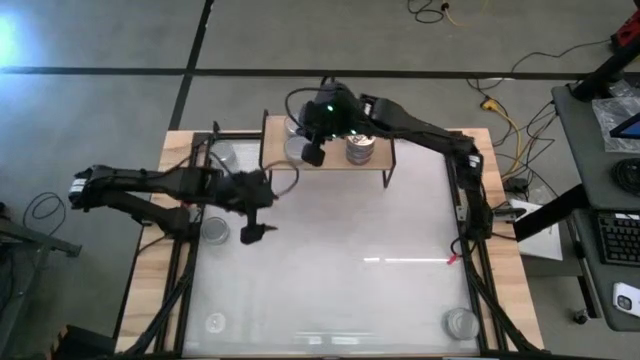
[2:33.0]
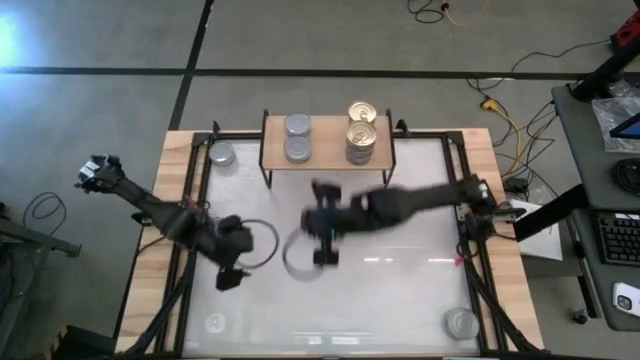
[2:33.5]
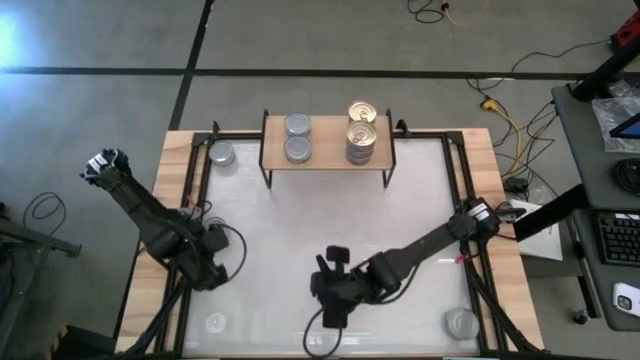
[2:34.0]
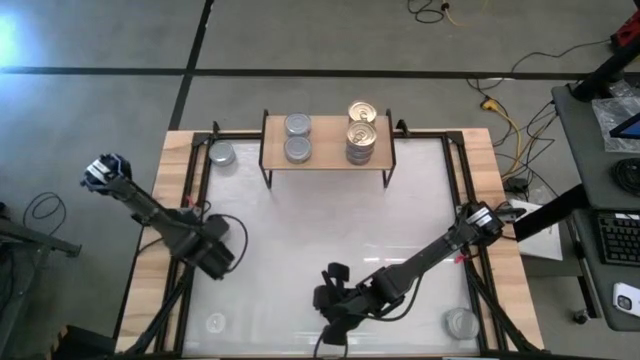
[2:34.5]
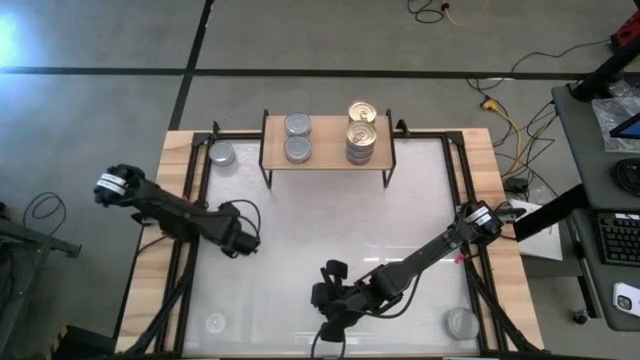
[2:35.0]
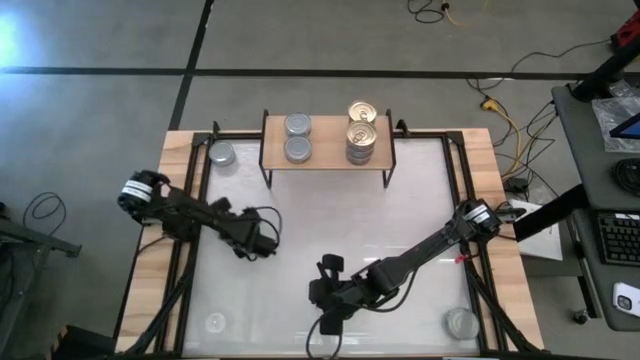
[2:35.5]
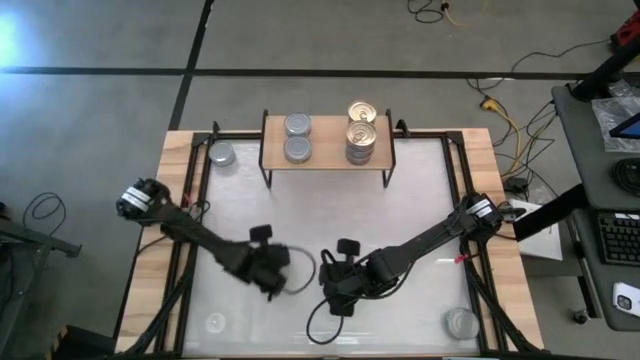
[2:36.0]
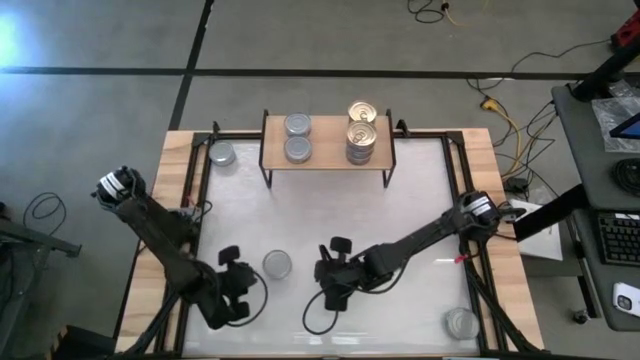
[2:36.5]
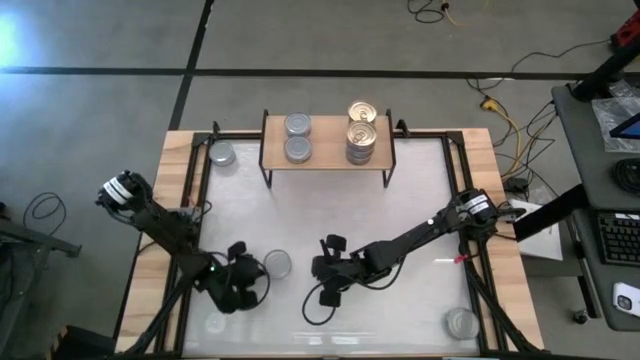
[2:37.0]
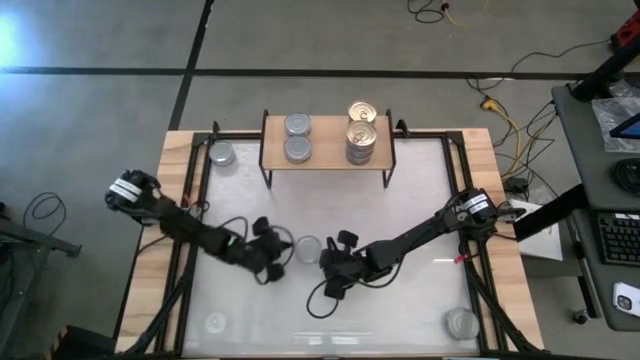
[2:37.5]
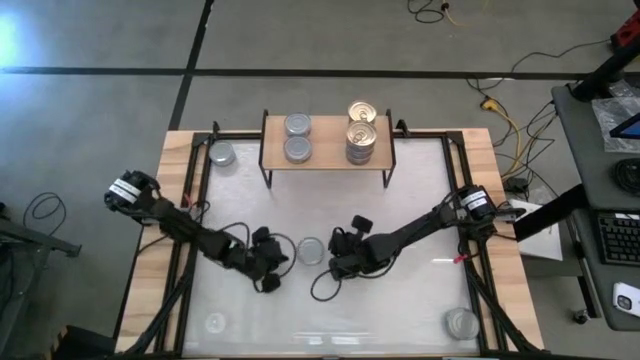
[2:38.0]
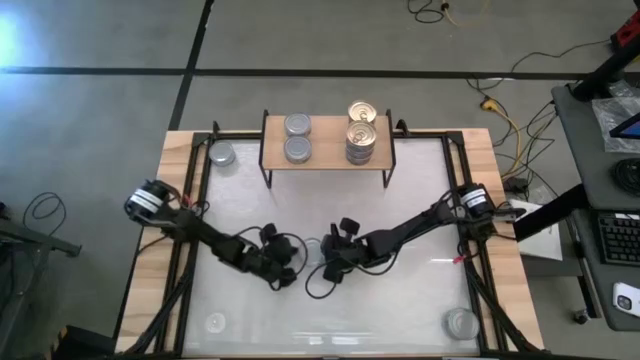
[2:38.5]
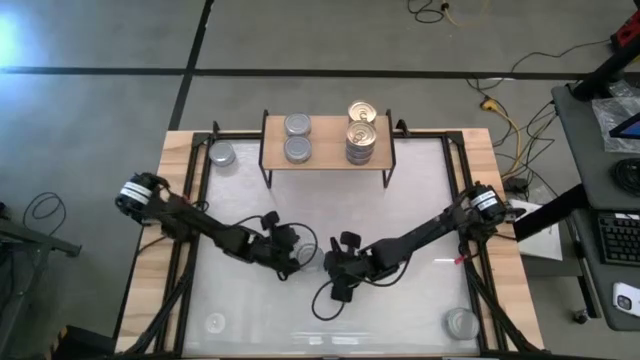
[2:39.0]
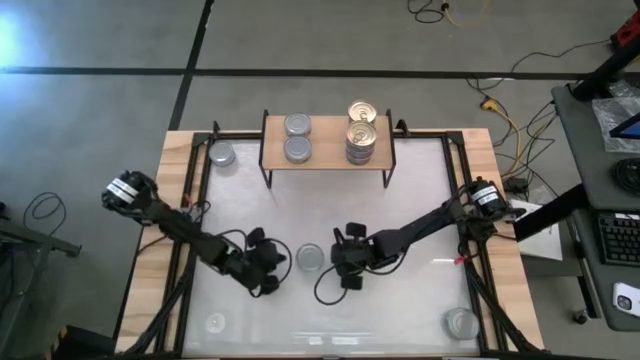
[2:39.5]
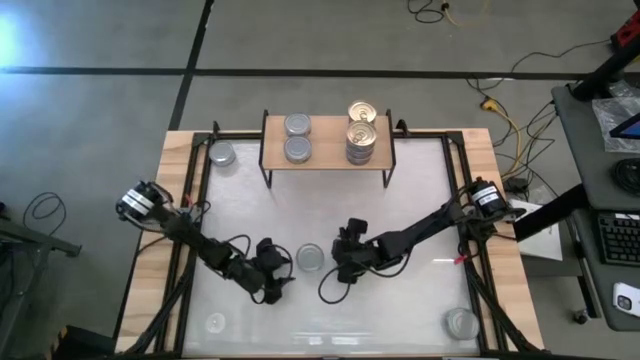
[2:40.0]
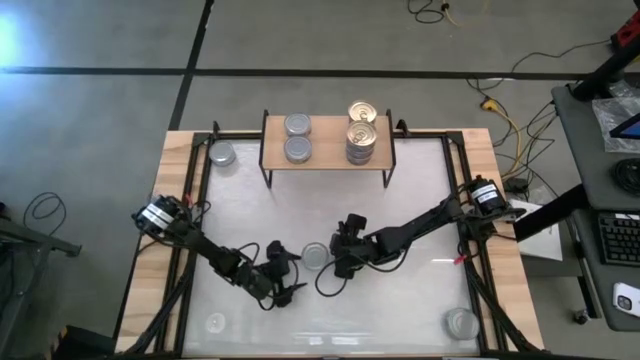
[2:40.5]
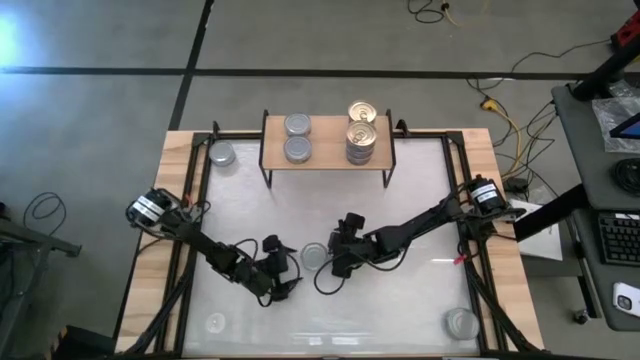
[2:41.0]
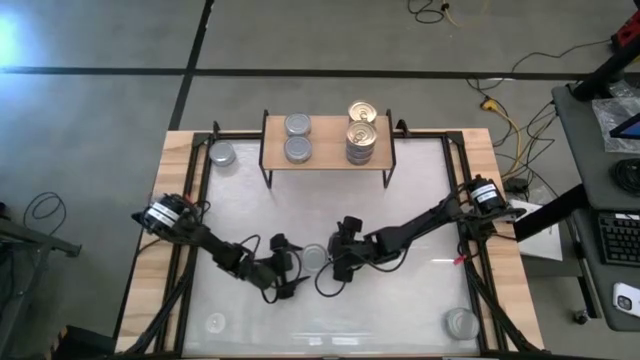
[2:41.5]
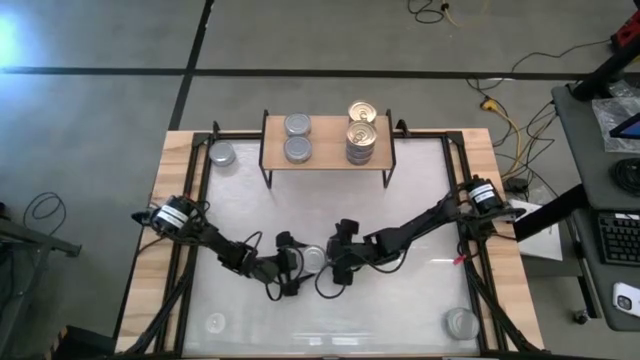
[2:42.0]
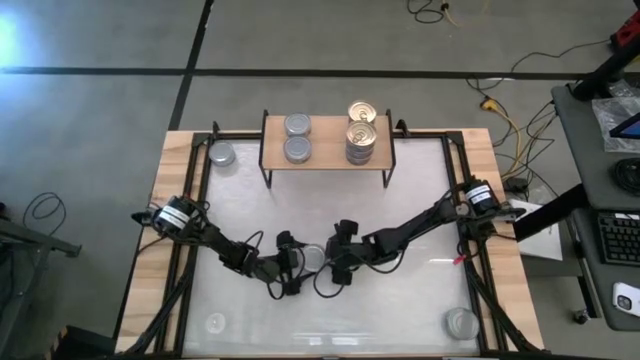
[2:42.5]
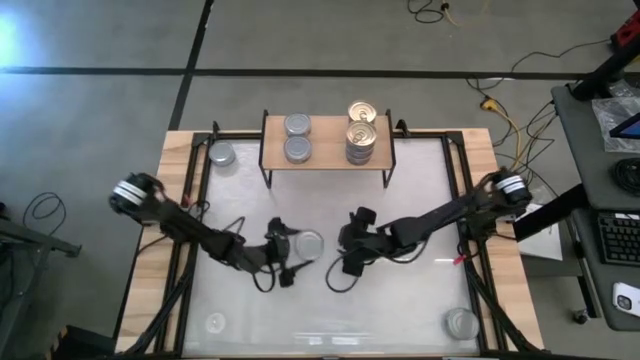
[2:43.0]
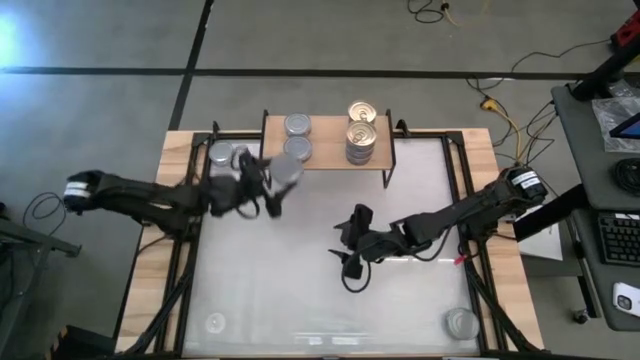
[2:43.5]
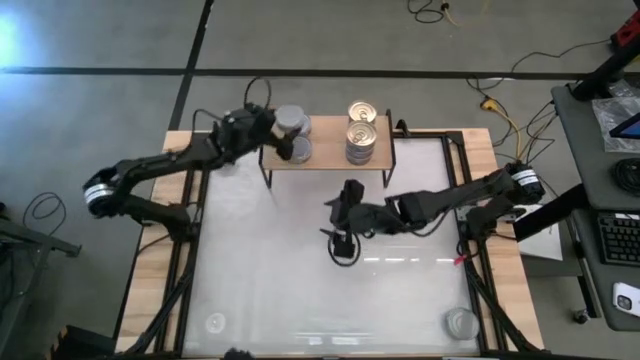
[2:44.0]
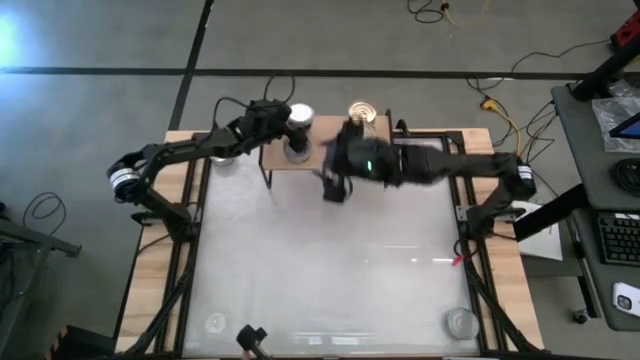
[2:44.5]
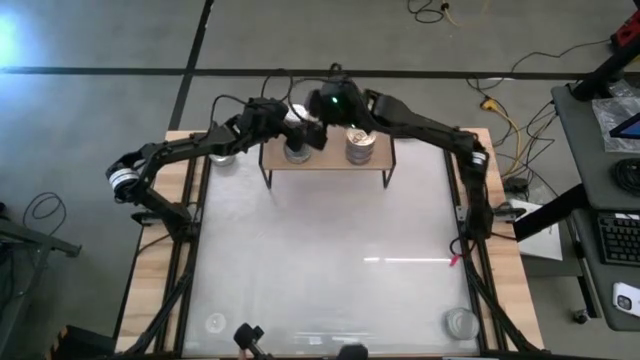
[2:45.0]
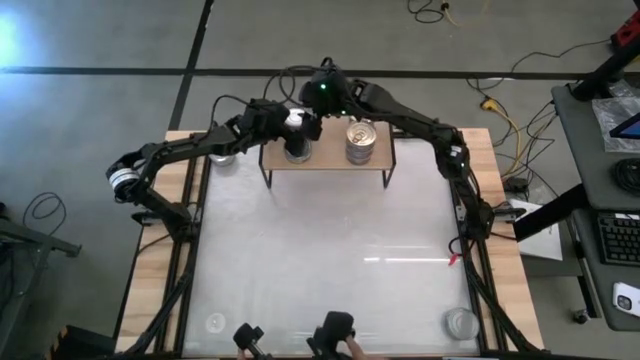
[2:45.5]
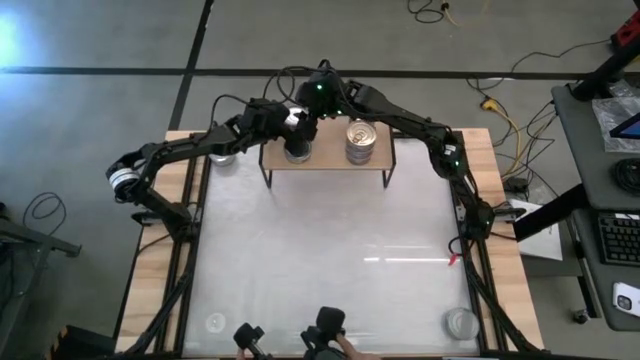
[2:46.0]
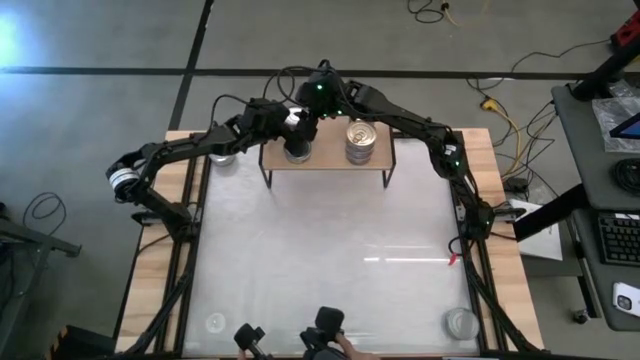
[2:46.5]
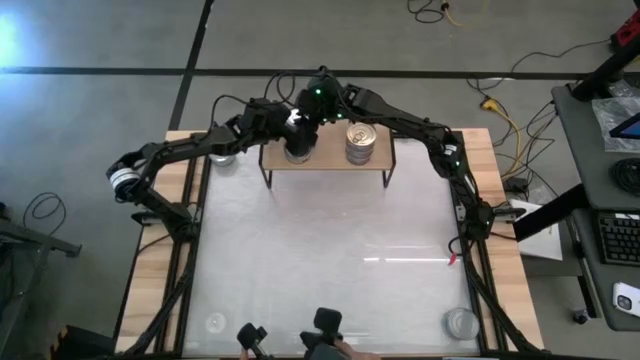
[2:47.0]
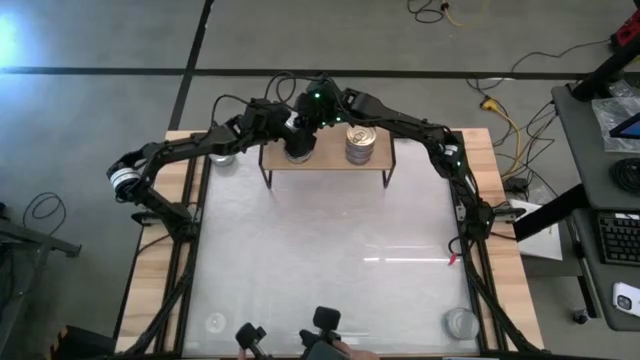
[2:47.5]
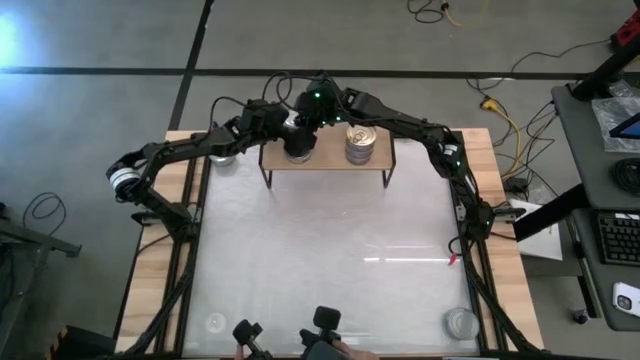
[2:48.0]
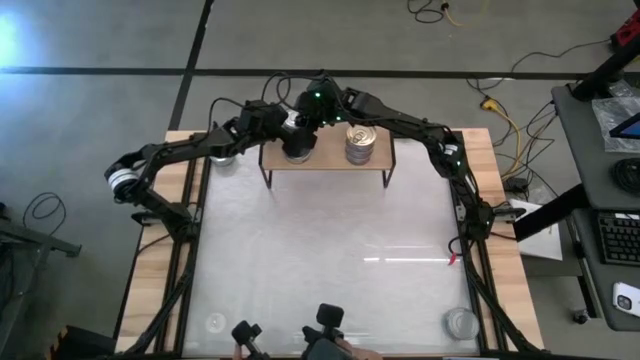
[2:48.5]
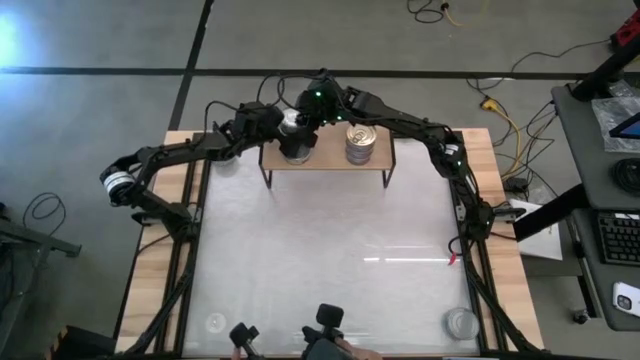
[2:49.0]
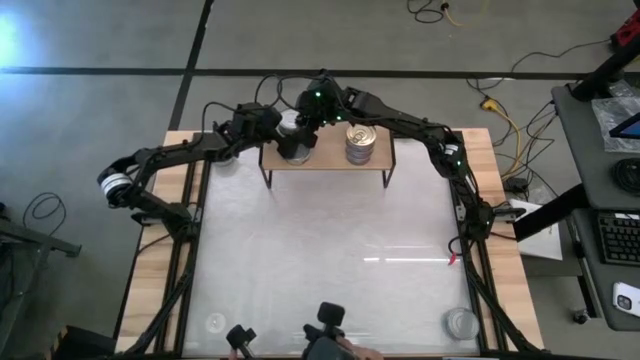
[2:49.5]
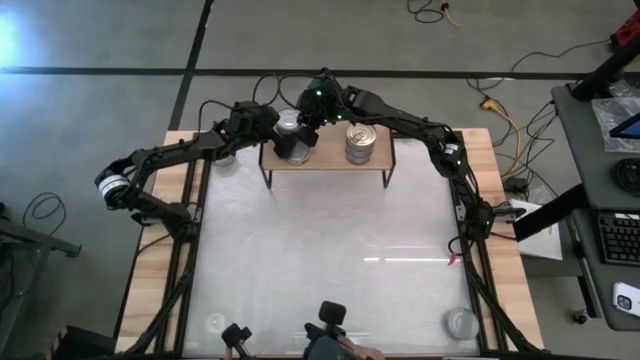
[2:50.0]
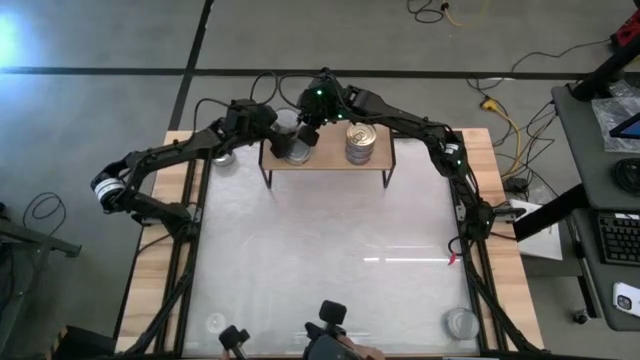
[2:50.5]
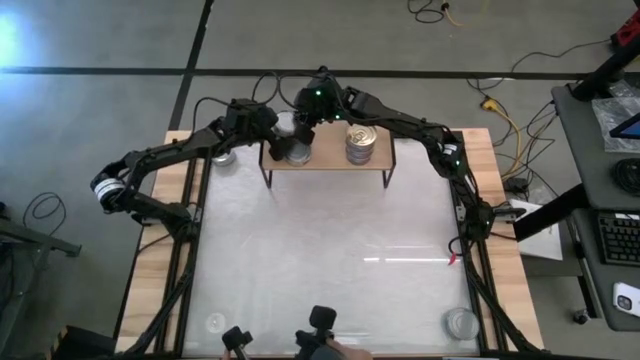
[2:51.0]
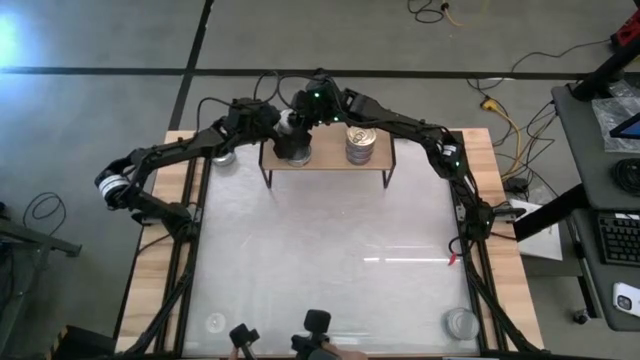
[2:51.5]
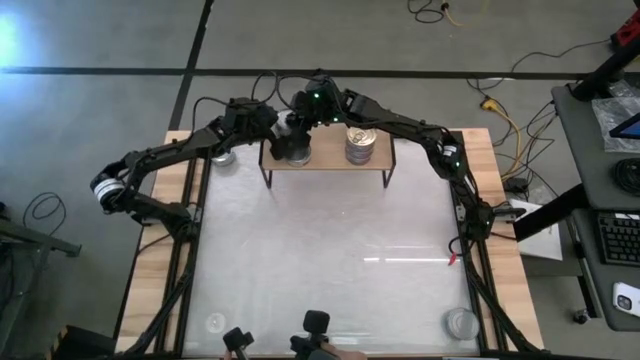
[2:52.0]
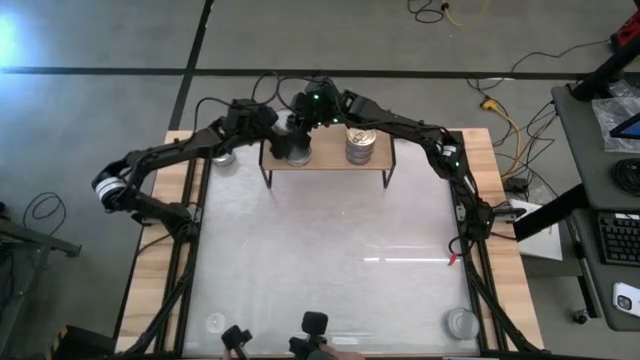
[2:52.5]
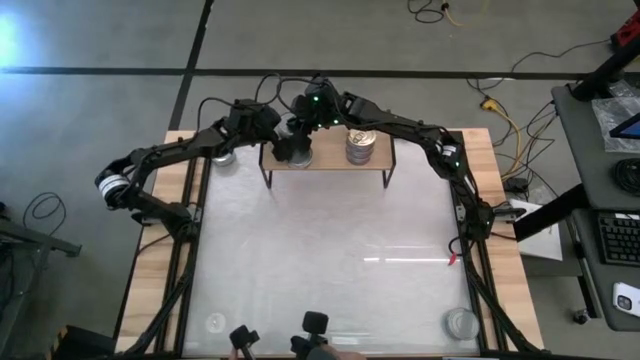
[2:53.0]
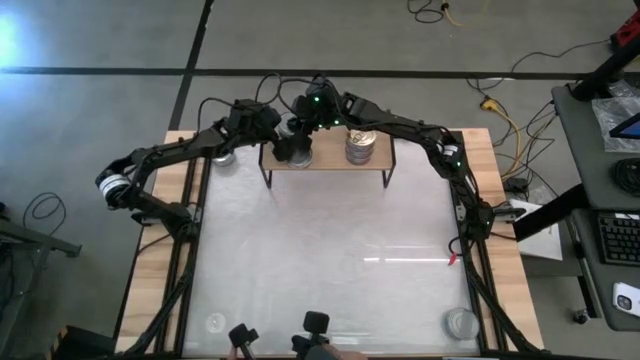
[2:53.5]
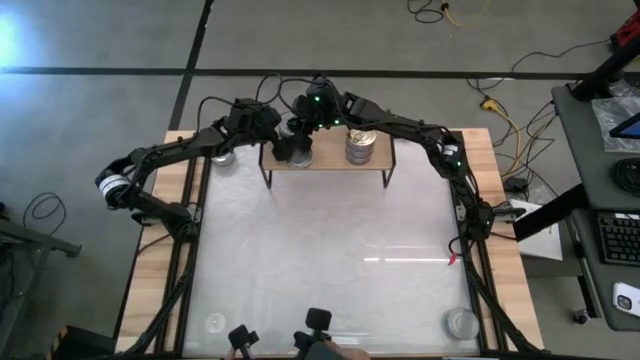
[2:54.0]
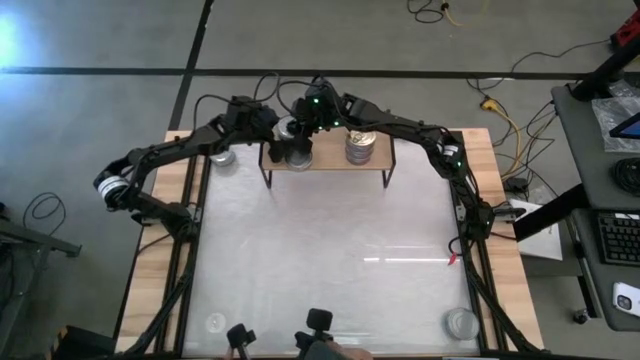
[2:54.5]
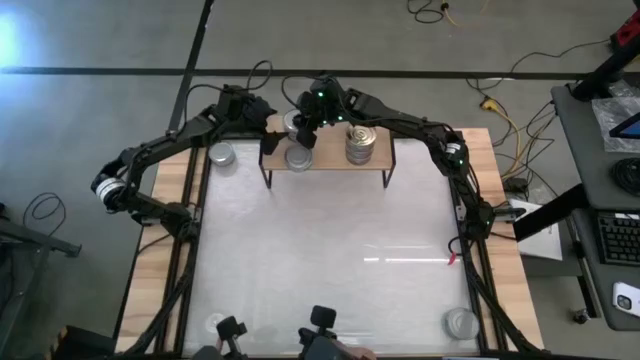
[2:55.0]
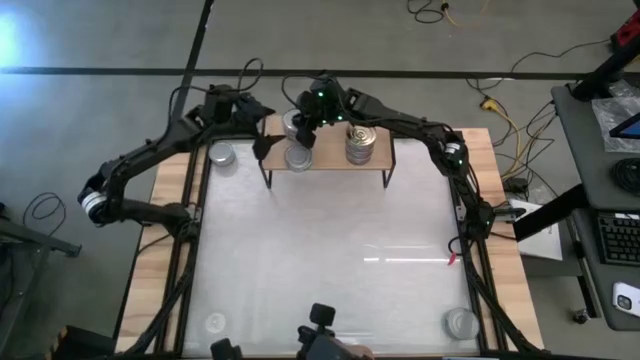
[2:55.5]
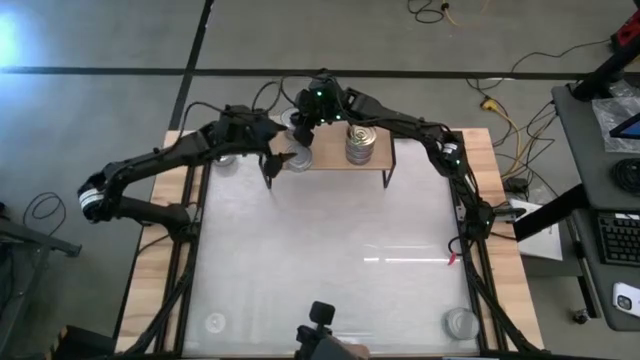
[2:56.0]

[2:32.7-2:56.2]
Task: Stack canned seafood by type on shelf
Stack the green tuna can on top of the green tuna can on the shelf
